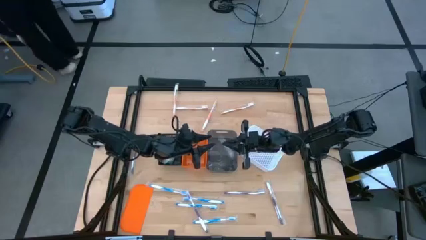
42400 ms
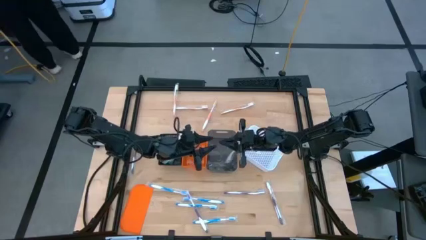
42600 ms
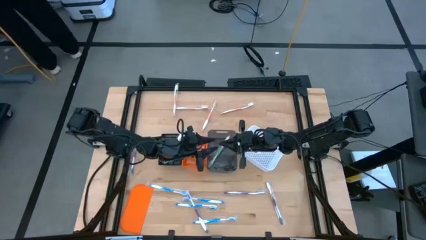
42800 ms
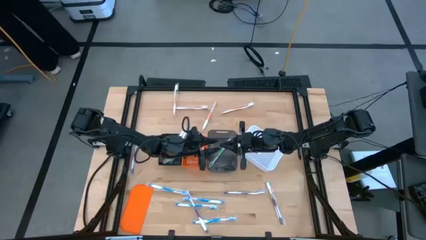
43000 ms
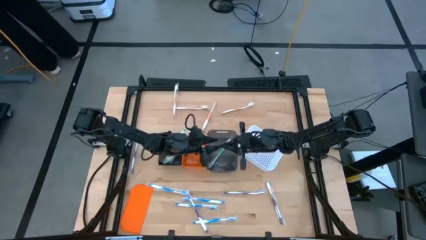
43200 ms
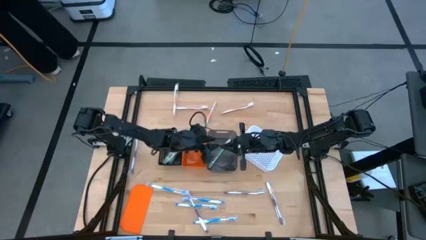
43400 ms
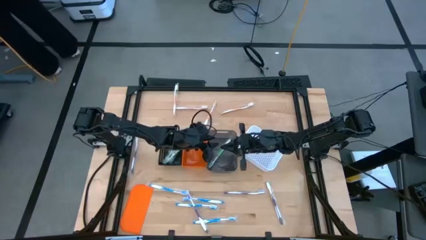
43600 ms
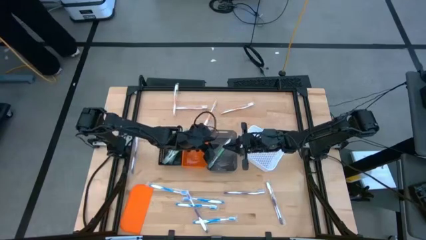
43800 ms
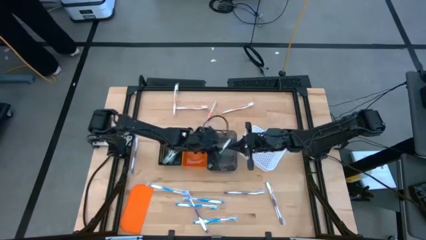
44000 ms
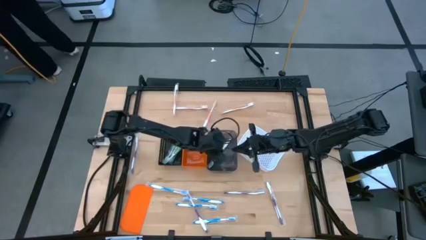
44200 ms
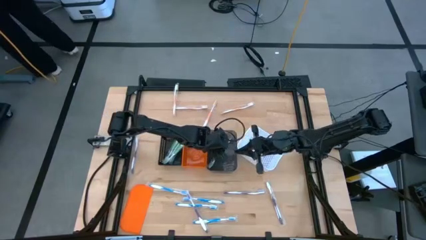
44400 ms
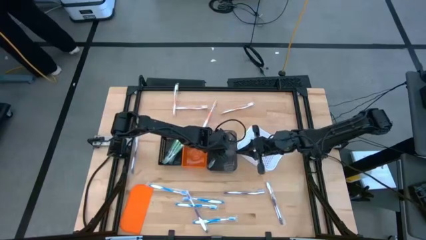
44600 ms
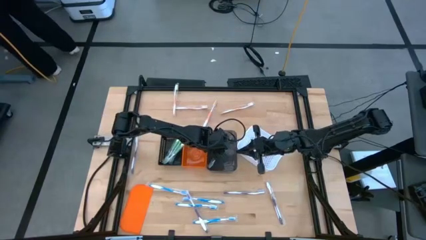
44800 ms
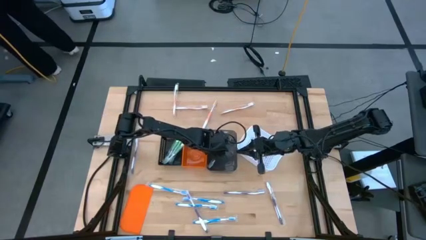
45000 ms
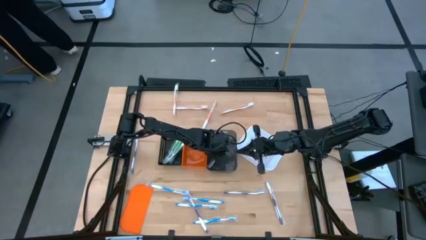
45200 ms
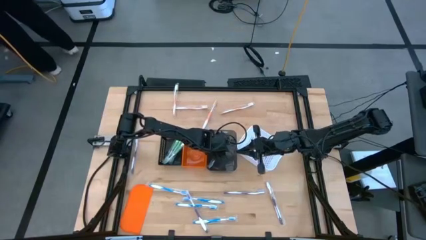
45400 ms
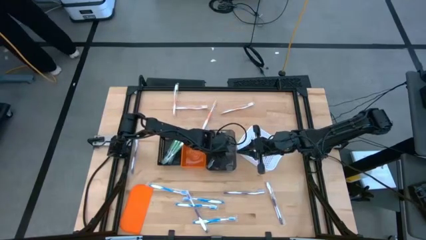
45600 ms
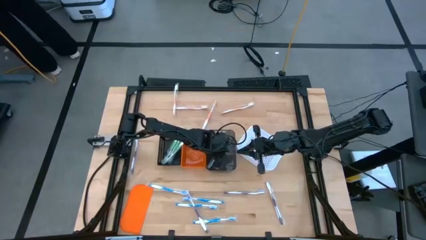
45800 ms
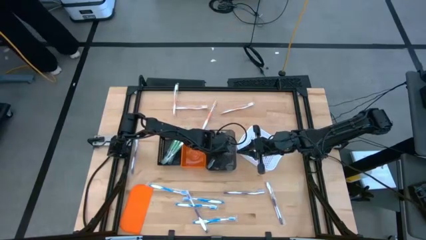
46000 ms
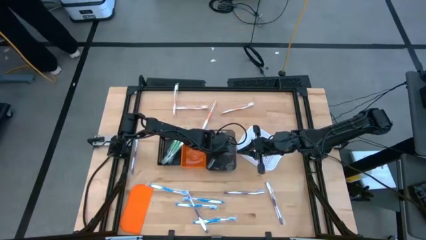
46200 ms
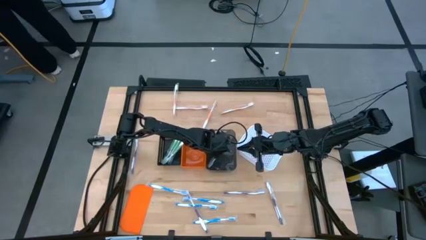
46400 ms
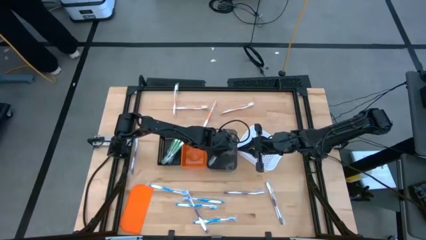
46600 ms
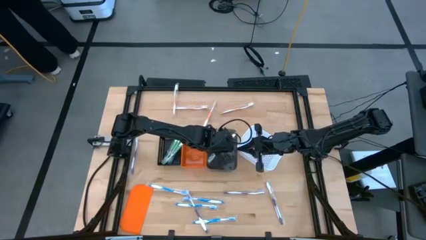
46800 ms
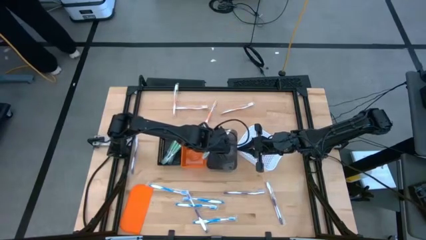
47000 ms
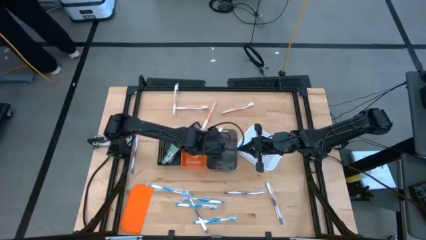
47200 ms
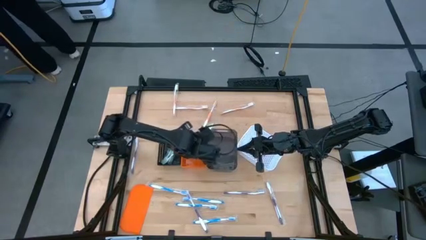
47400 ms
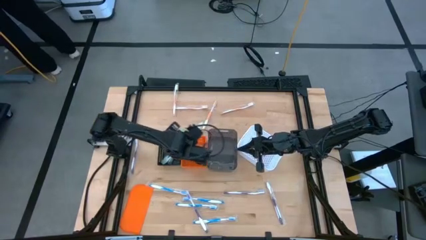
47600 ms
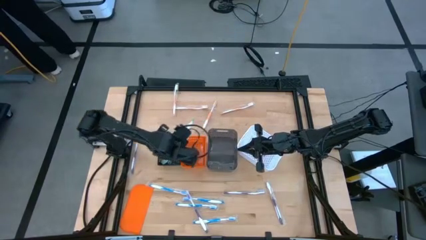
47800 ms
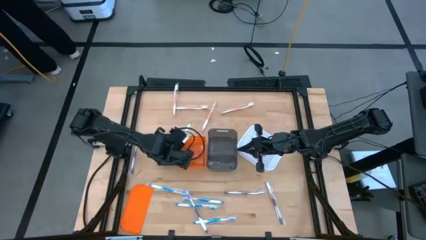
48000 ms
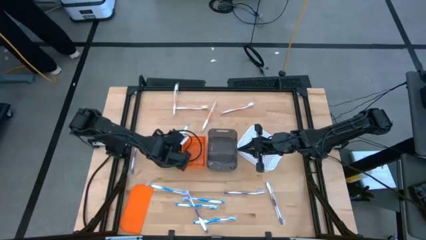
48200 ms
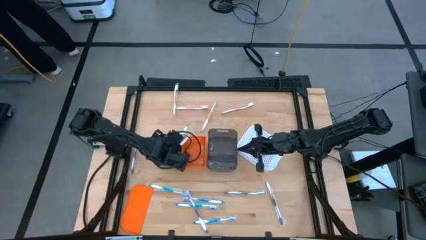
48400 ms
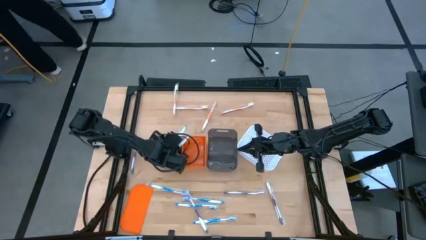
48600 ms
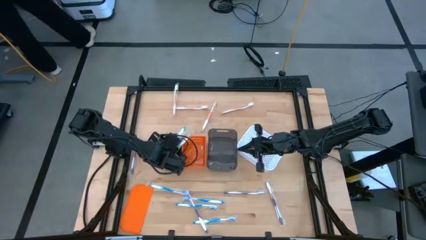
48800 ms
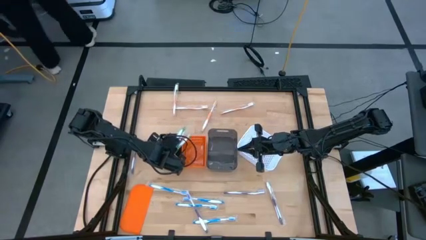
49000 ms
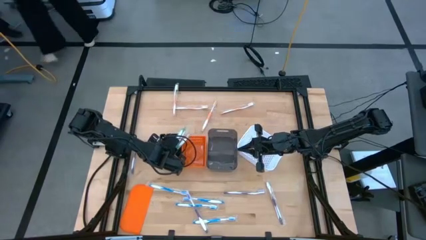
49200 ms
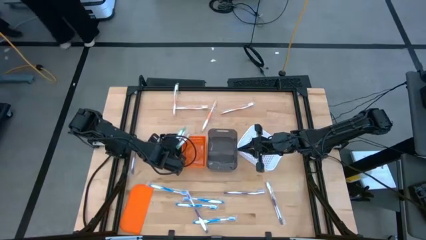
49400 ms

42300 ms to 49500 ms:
Task: Pick & Place Toothbrushes
Put the green toothbrush into the black bin

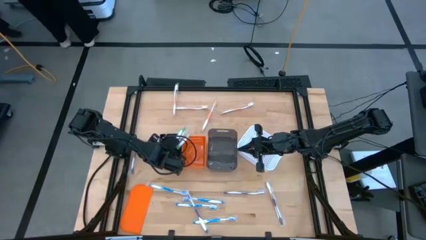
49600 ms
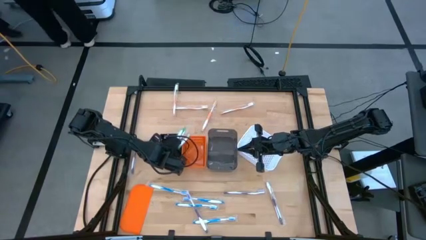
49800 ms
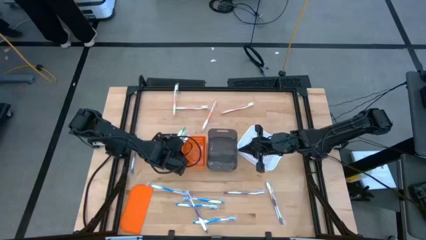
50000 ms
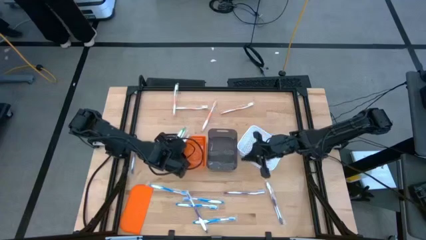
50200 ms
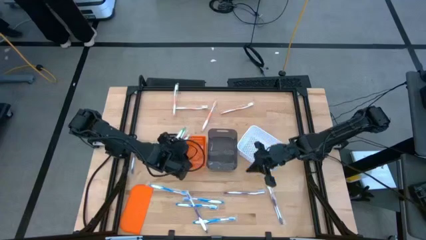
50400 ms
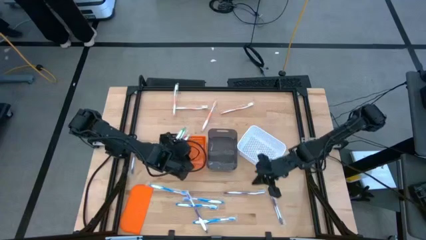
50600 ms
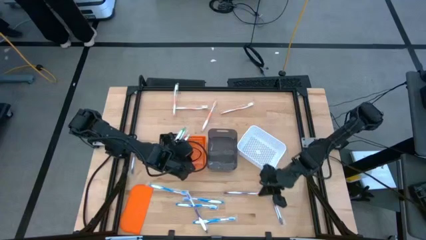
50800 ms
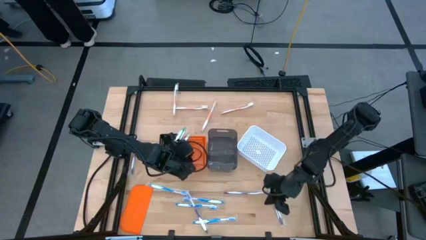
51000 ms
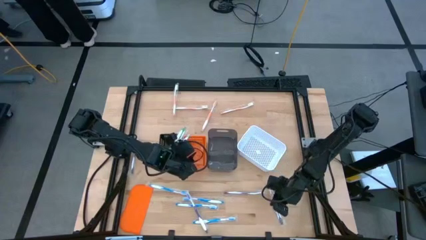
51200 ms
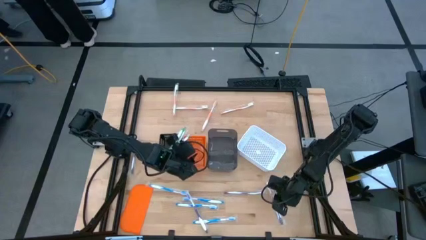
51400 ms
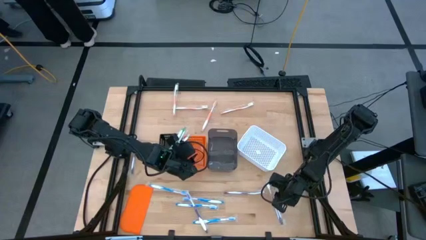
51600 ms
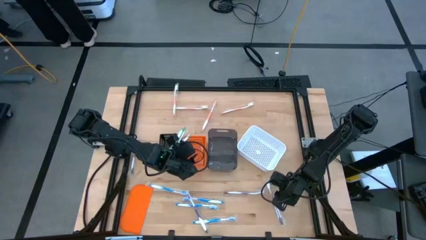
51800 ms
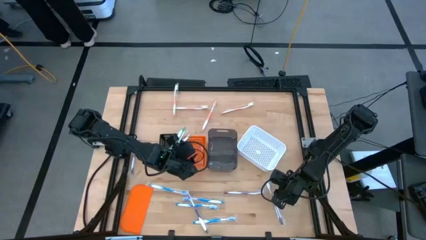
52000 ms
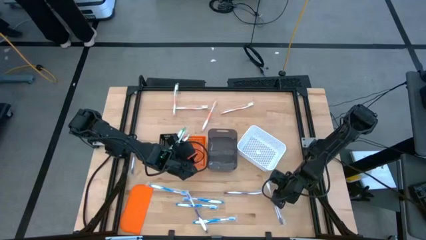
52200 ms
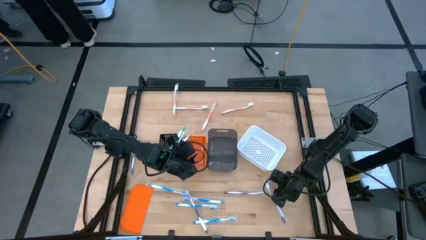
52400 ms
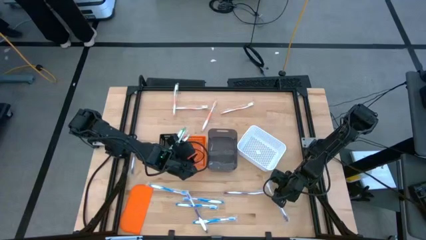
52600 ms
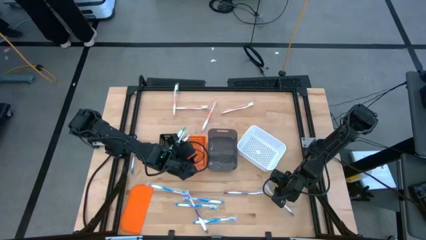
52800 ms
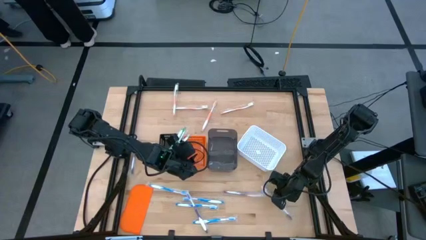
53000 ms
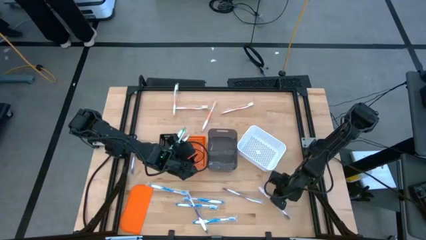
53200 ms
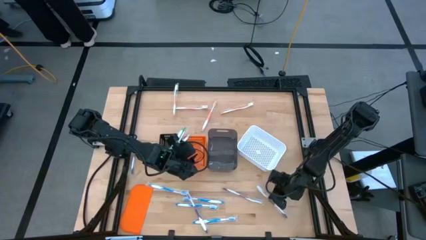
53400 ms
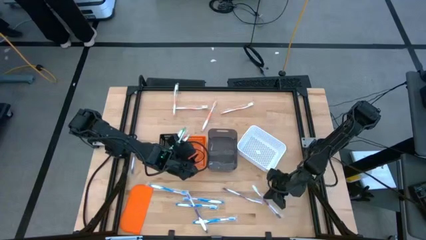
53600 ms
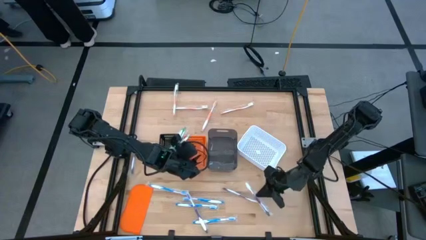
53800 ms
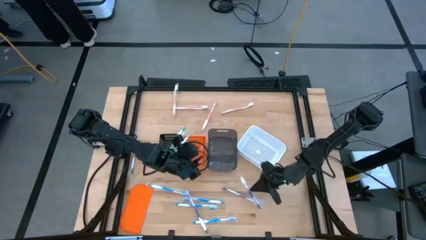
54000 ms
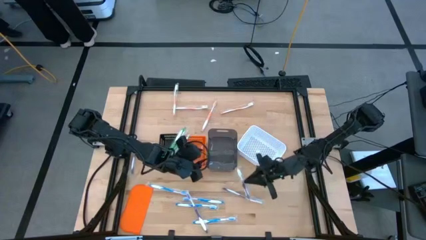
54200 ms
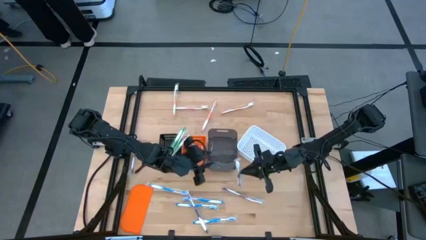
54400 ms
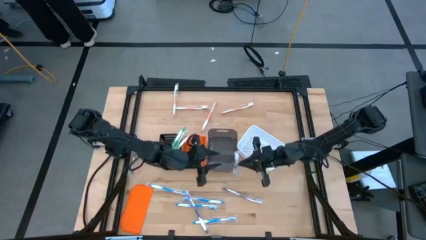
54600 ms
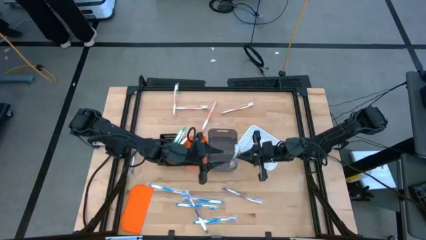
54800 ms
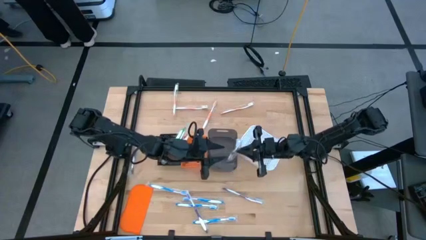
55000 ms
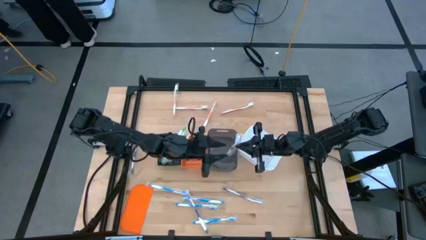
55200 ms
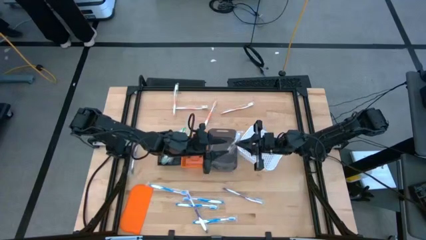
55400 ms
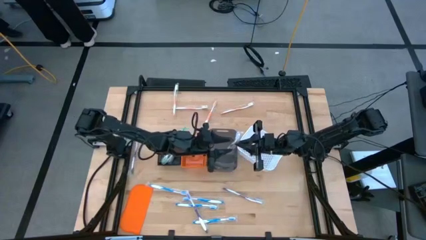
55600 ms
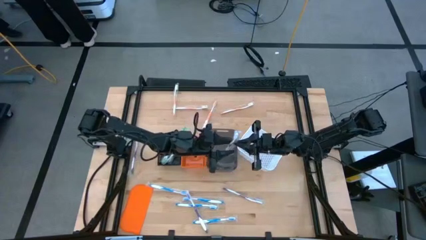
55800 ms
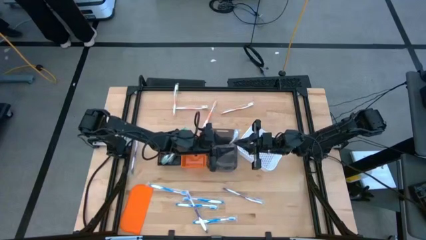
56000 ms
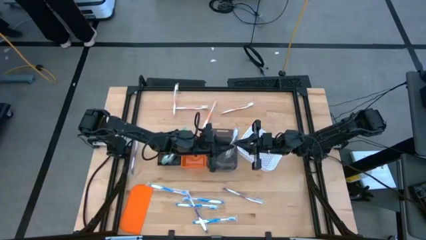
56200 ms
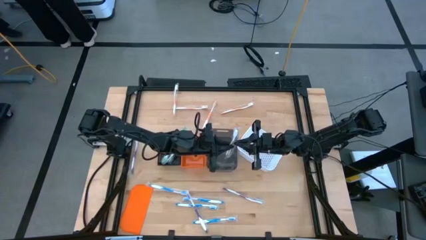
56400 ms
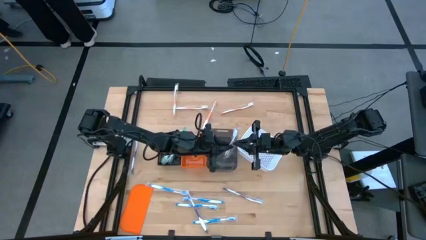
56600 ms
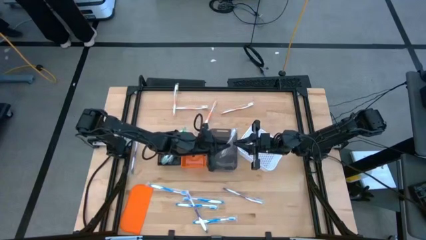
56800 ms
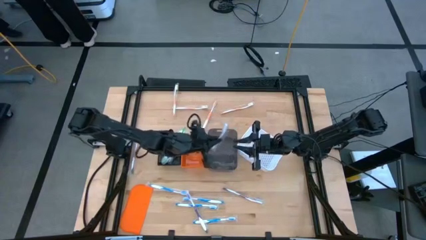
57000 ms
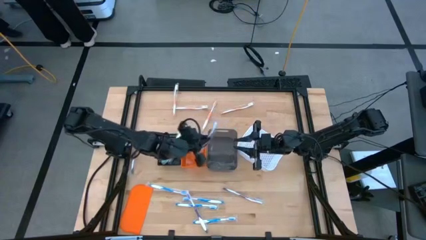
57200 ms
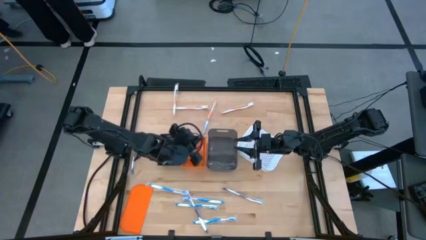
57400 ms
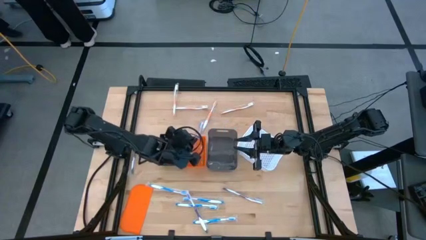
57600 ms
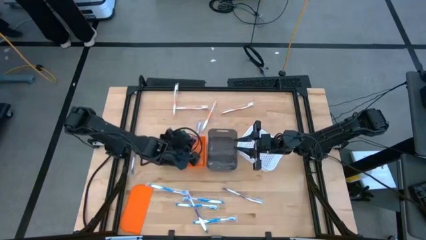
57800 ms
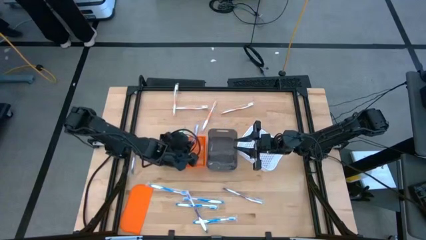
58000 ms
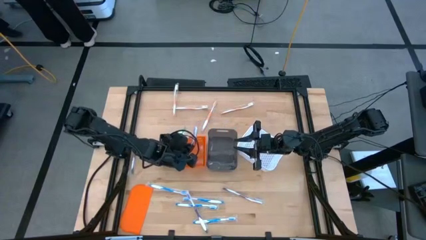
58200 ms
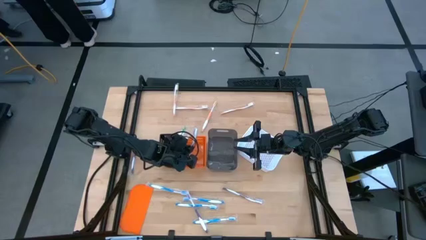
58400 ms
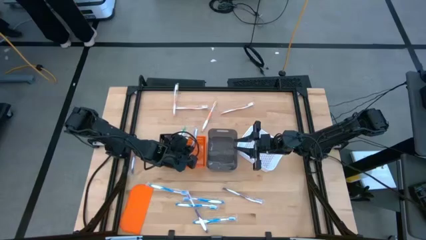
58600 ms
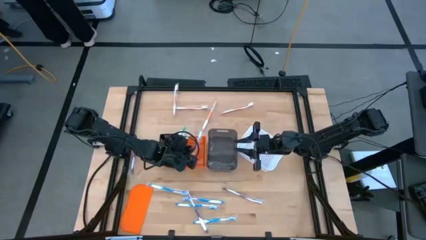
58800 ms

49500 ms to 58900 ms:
Put the violet toothbrush into the orange bin

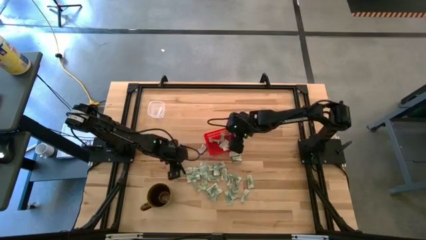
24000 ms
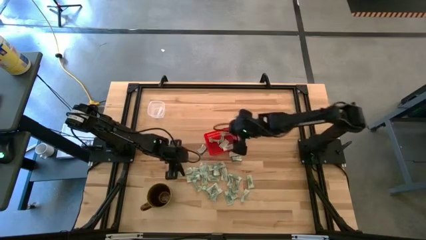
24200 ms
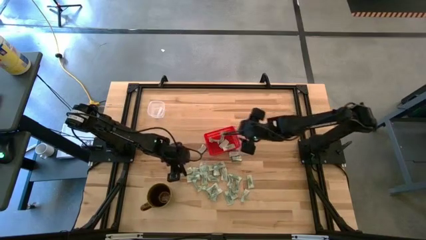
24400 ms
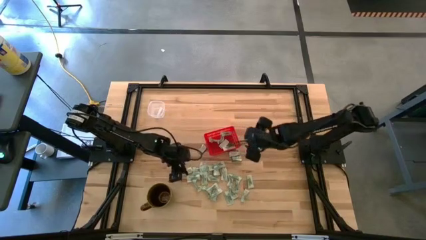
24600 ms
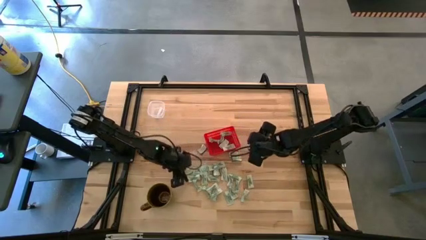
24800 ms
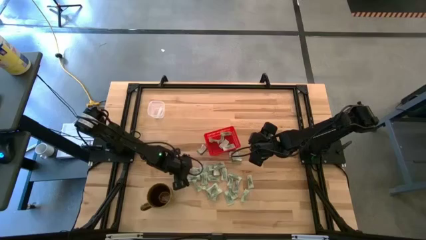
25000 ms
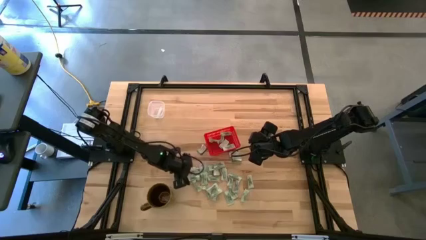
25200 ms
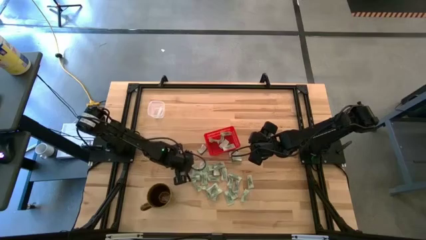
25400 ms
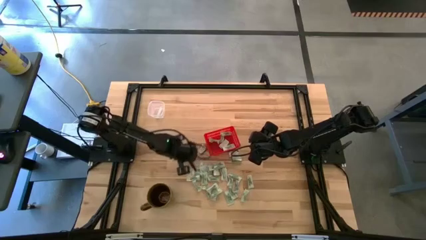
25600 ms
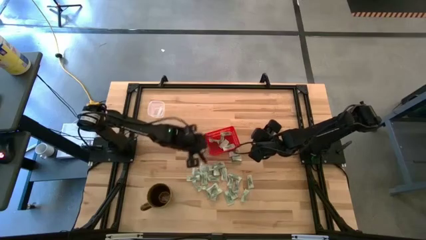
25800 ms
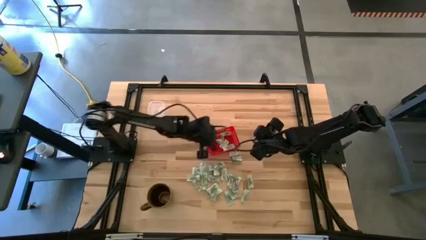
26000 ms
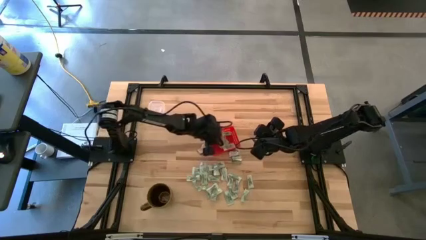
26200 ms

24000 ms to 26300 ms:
Task: Pick and place items into bin
Put the green stevia packet into the red bin
